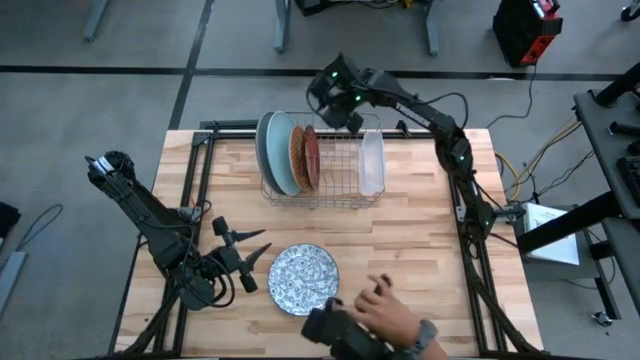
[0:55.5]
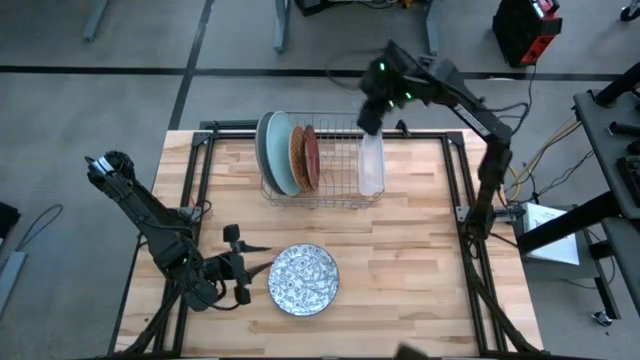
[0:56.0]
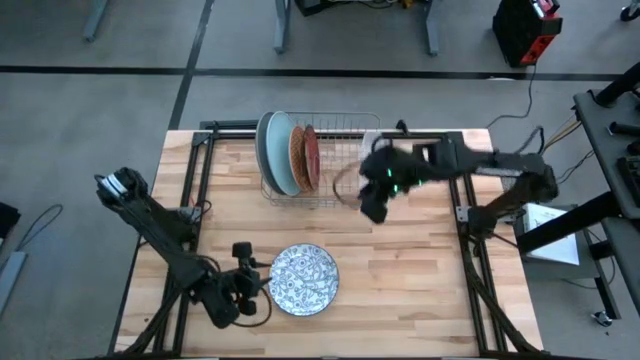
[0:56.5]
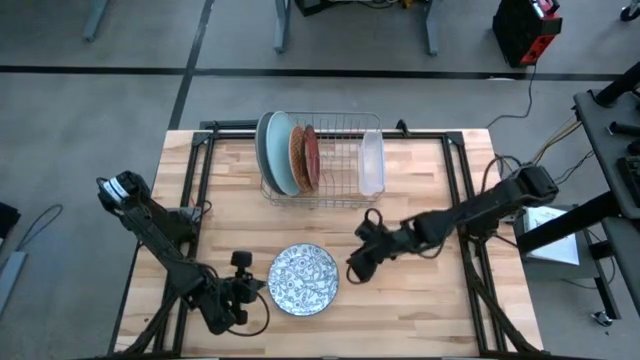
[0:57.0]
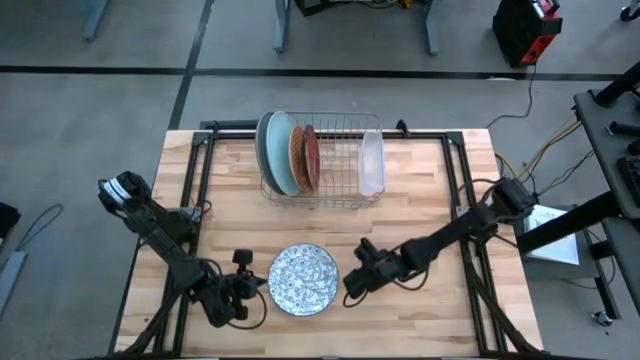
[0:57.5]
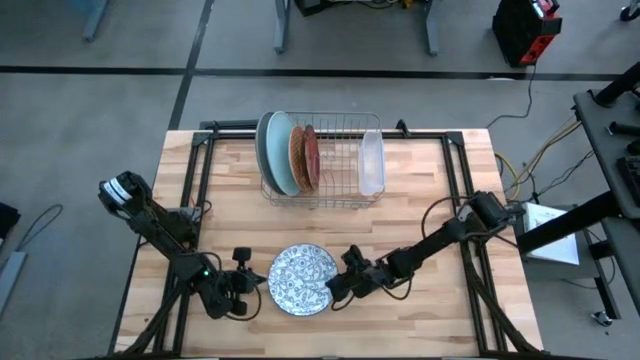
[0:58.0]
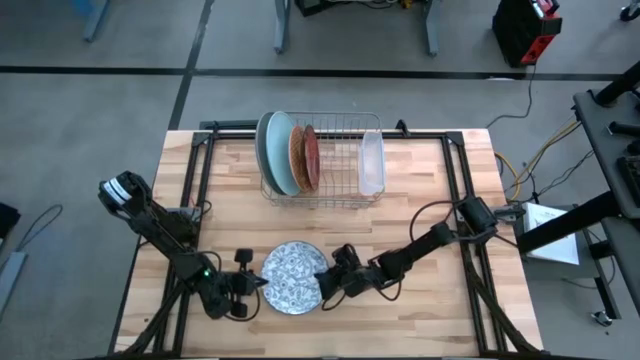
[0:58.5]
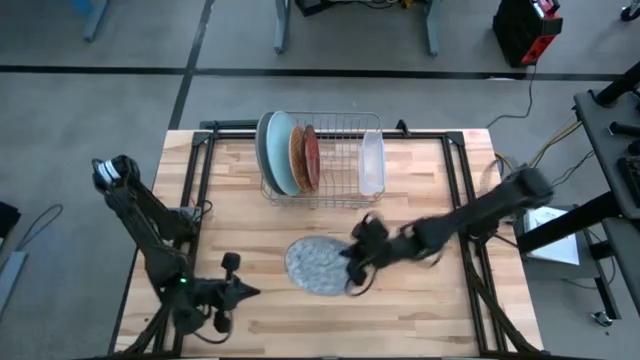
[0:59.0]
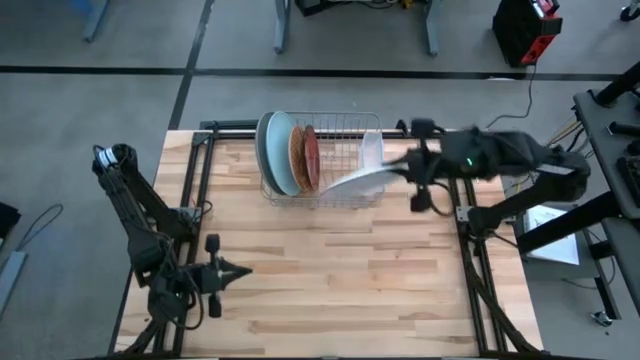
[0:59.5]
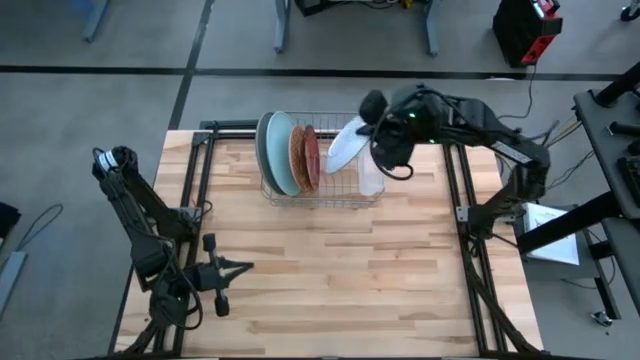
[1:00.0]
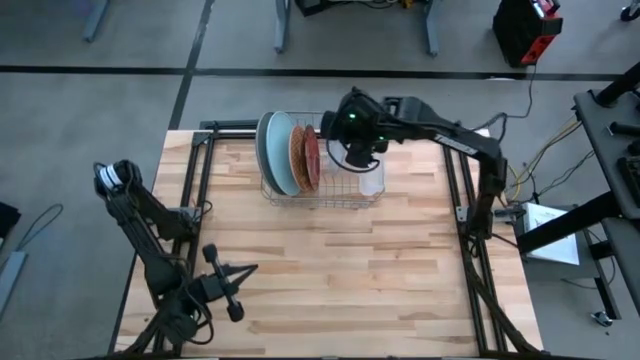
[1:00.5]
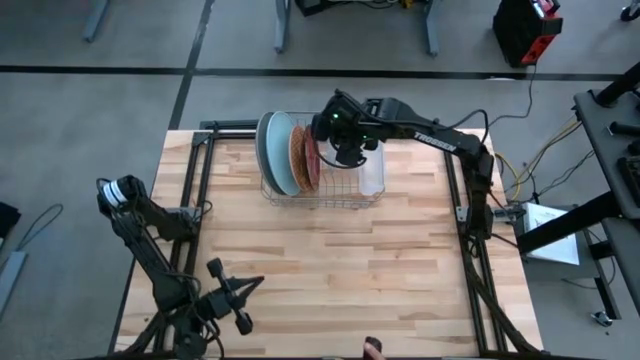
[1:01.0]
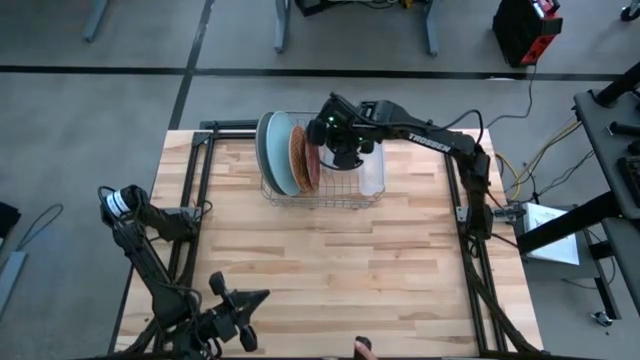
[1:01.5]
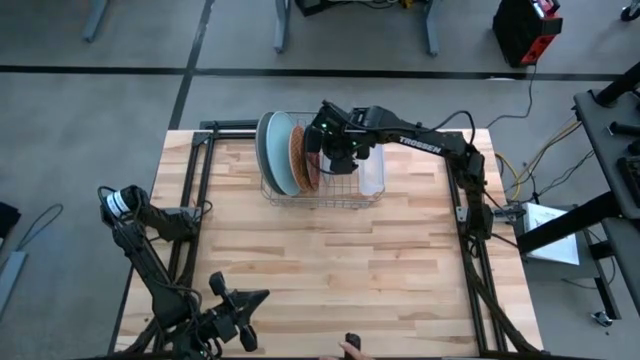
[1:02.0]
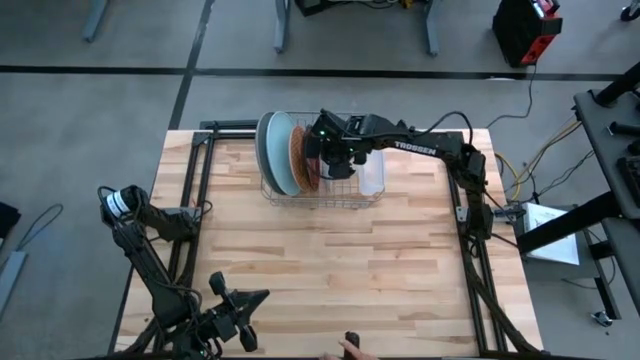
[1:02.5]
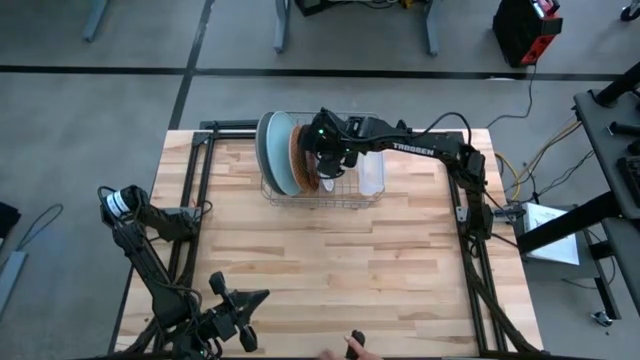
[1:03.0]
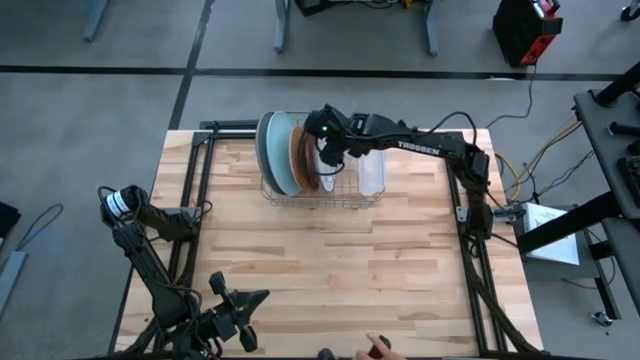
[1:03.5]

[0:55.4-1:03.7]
Task: Sort dishes
Put the blue patterned plate in the dish rack

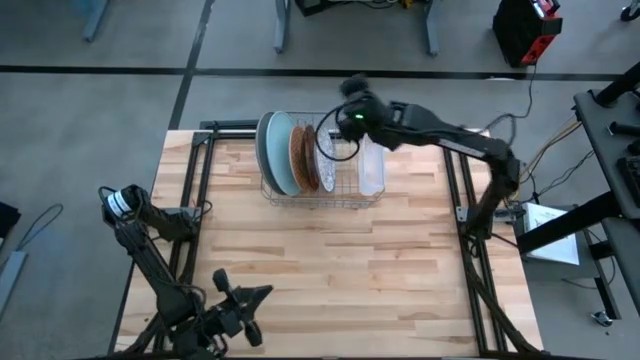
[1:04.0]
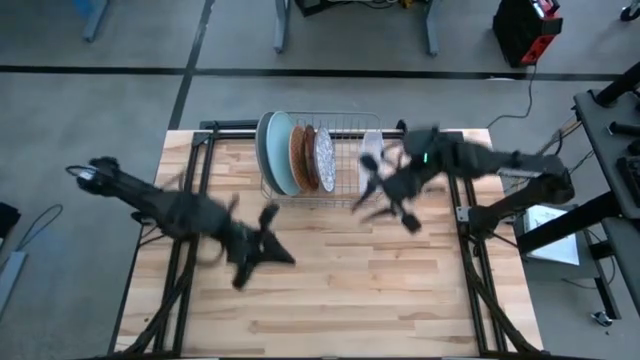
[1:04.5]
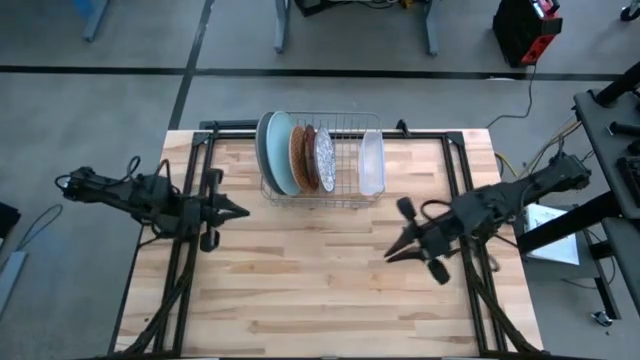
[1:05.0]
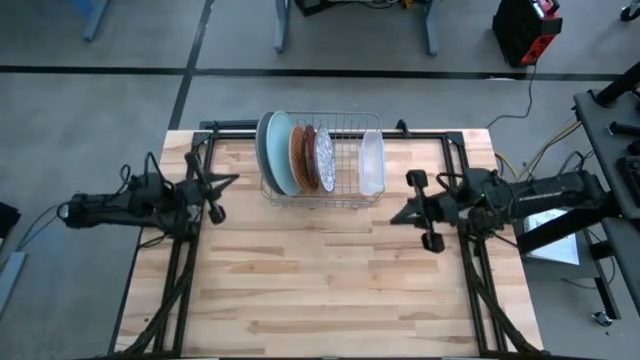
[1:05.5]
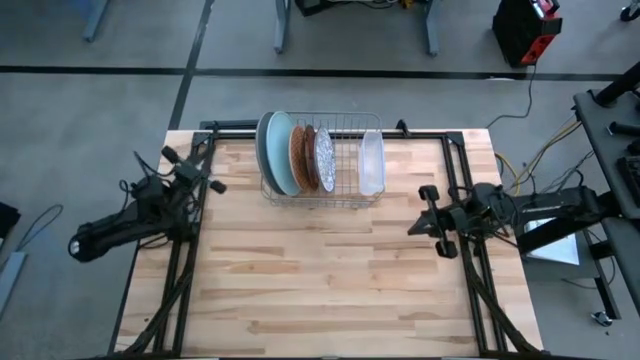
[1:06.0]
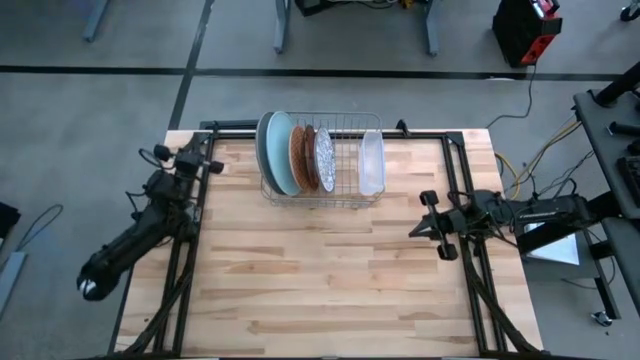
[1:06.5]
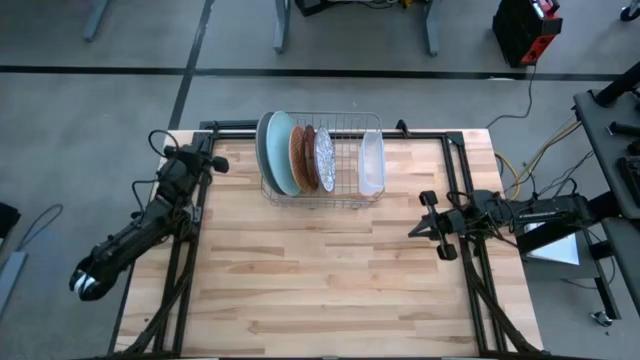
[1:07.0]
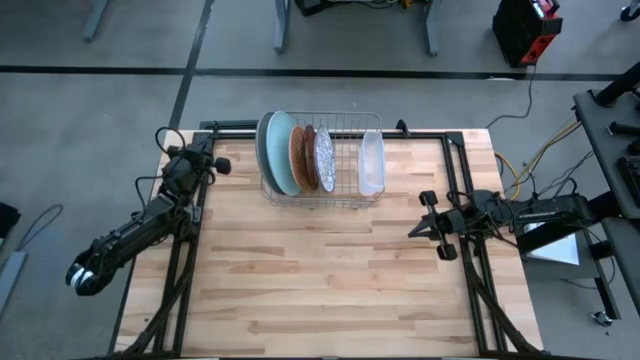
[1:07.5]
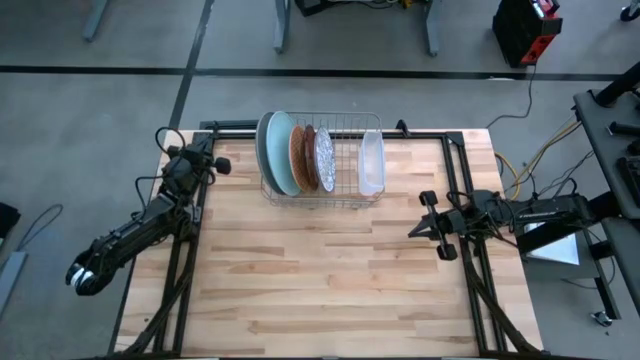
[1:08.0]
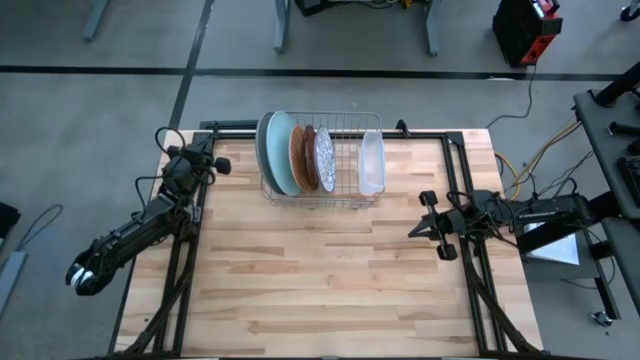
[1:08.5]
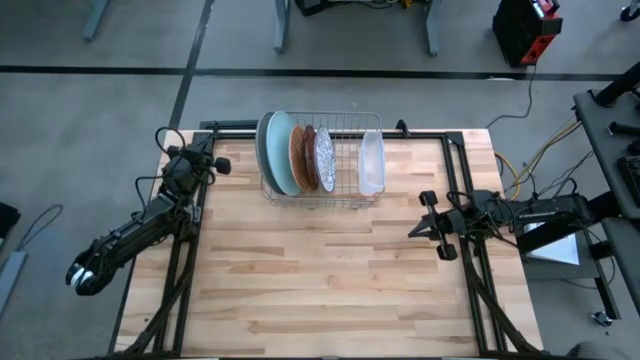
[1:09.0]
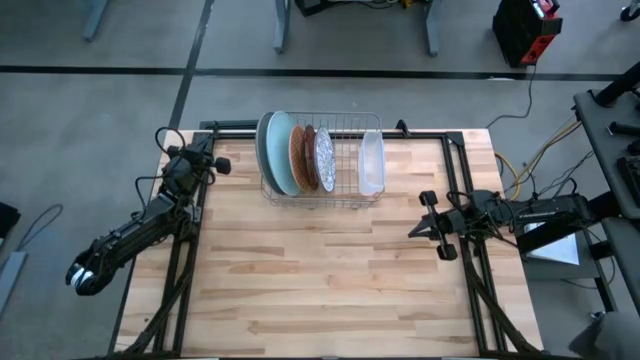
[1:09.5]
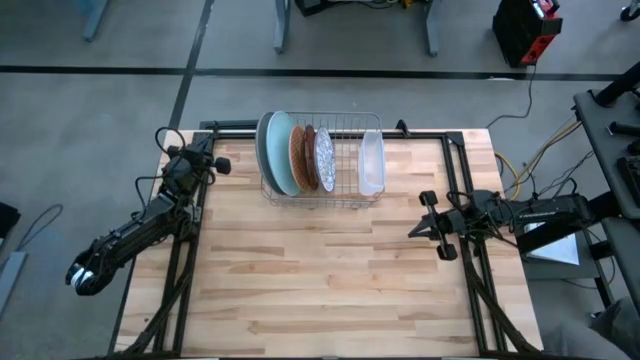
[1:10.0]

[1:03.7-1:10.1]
Return to Home Position
